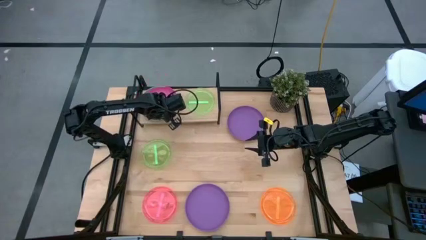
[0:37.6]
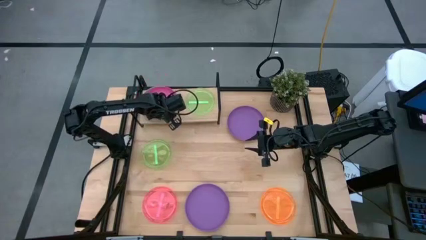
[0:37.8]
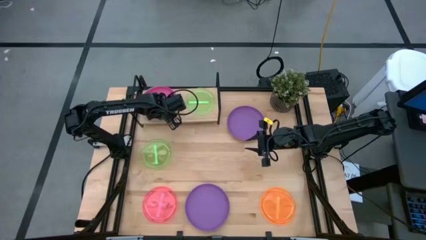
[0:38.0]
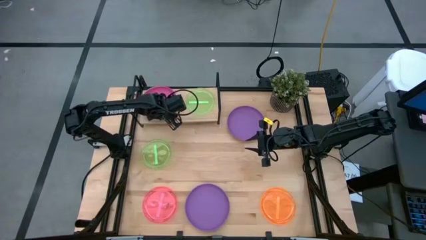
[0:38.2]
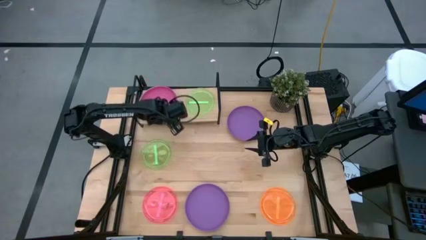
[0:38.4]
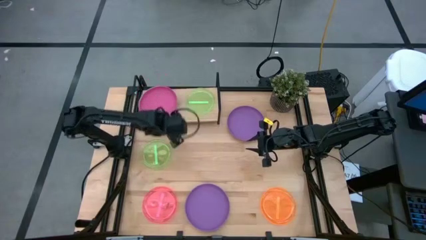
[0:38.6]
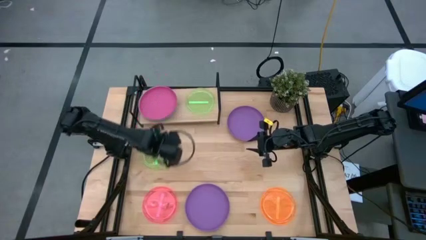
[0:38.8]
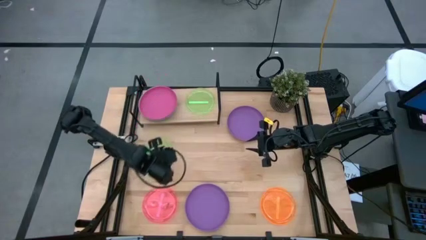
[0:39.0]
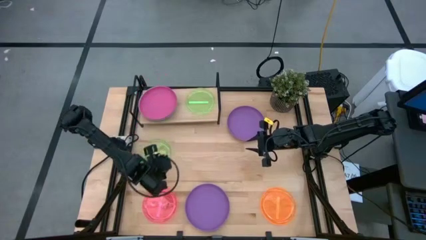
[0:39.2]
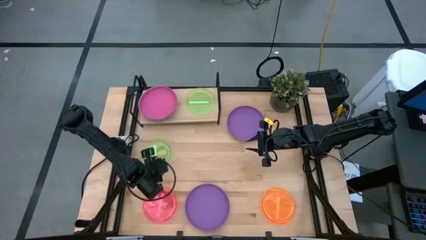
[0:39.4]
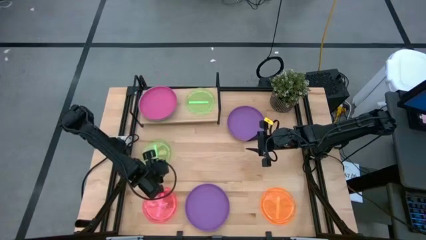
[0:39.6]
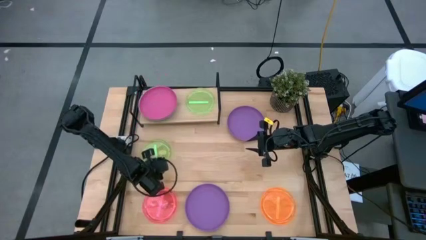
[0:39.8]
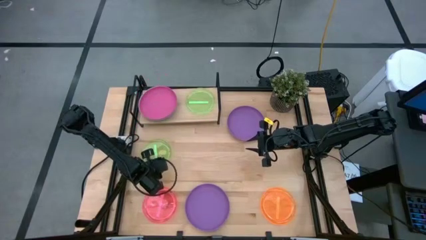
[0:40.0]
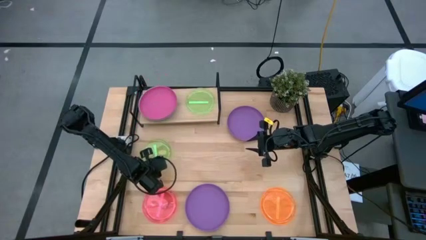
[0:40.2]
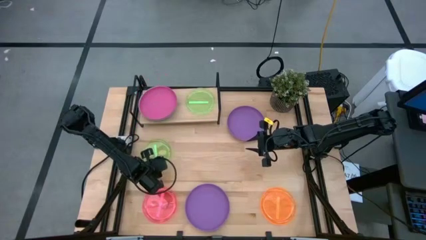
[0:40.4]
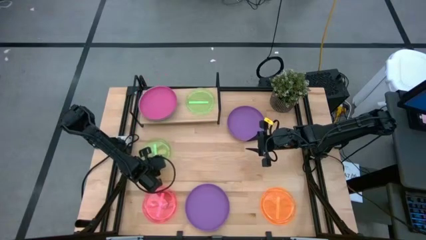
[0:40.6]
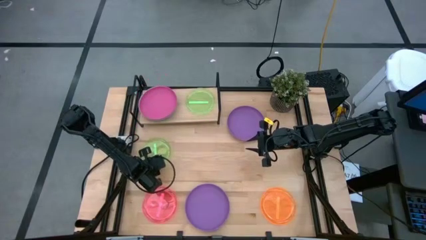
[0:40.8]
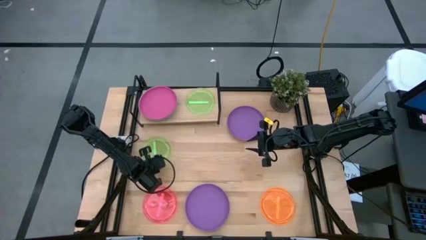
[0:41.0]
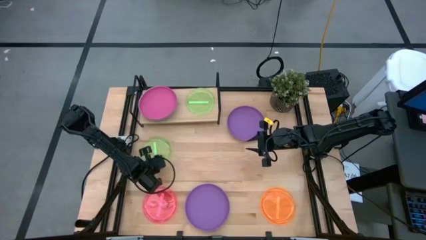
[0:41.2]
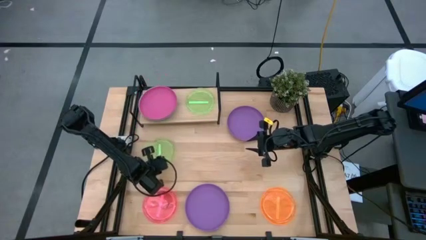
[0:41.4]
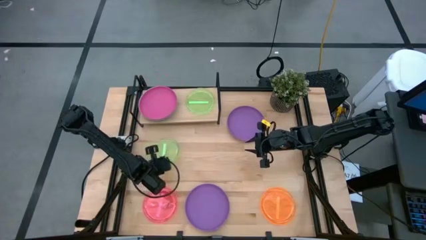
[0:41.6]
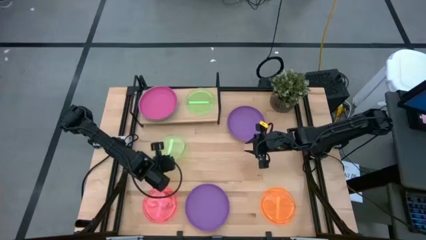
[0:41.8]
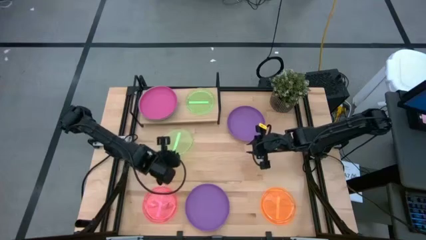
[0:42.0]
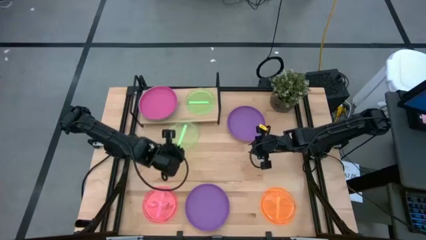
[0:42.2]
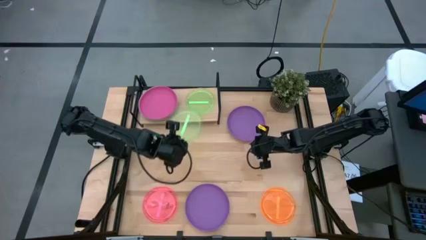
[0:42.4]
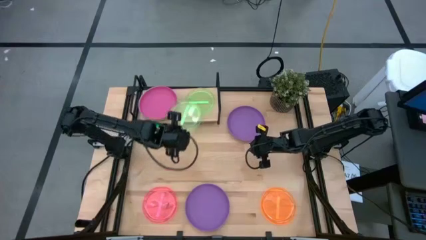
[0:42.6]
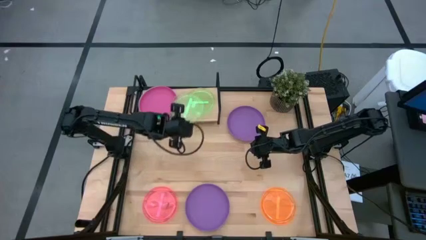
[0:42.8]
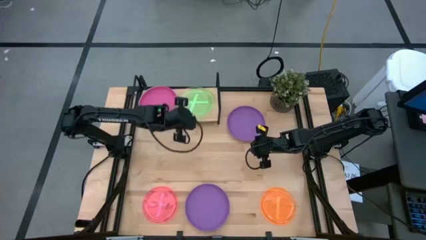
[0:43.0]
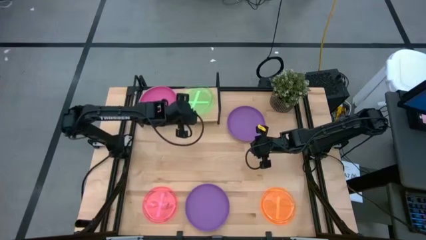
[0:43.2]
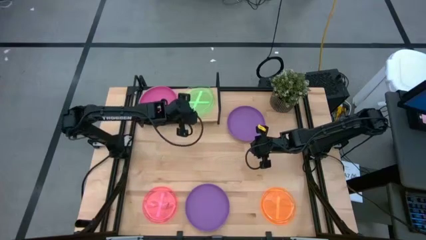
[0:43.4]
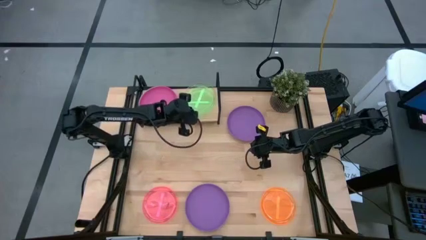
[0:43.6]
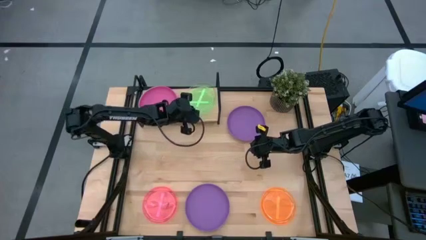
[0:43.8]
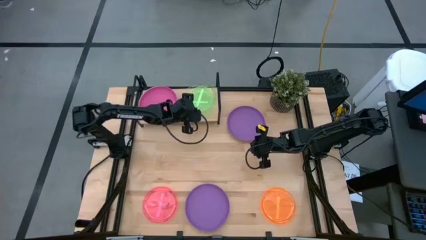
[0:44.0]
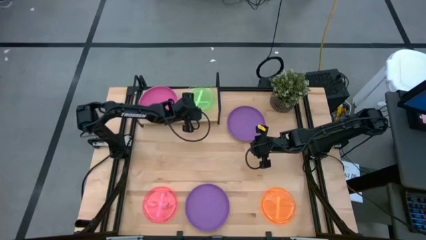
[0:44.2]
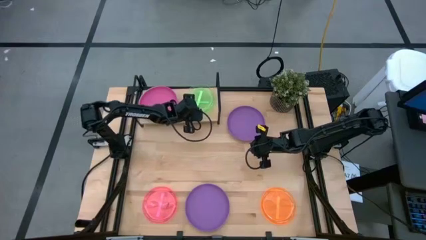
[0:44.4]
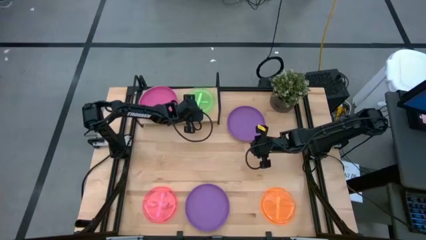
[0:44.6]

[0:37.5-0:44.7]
Task: Place and stack plates onto a shelf
Stack the left green transparent plate into the green transparent plate on the shelf

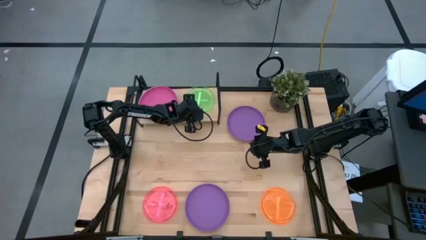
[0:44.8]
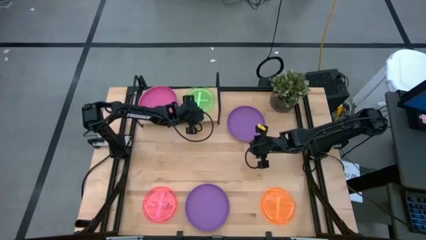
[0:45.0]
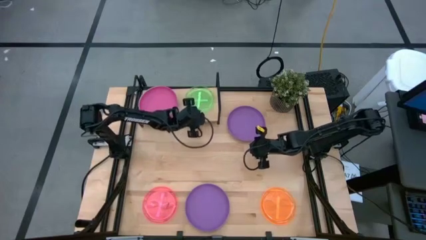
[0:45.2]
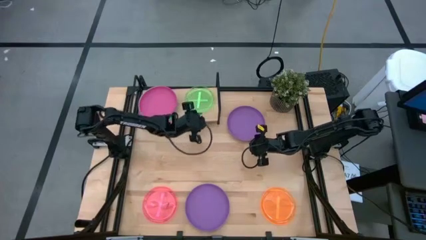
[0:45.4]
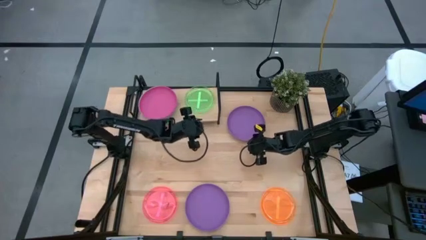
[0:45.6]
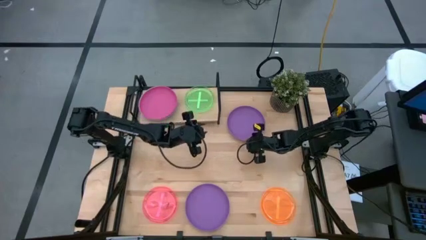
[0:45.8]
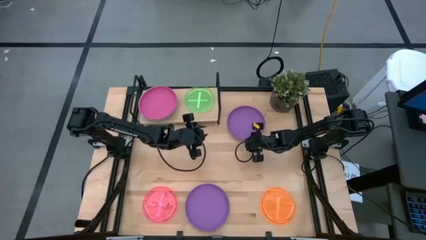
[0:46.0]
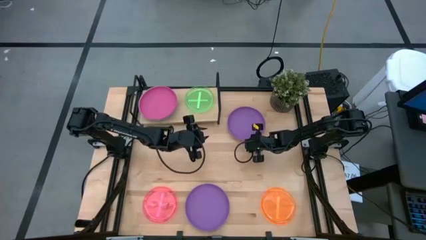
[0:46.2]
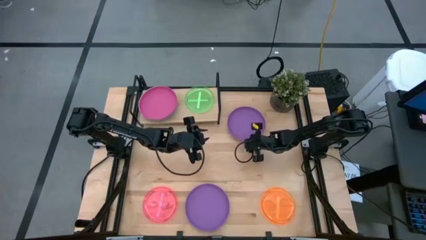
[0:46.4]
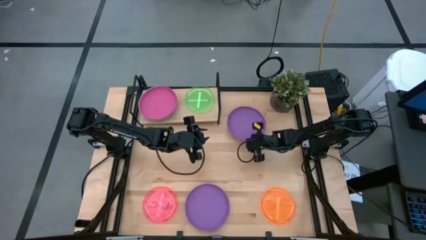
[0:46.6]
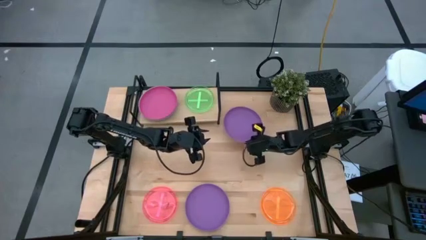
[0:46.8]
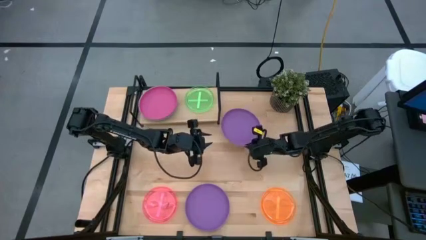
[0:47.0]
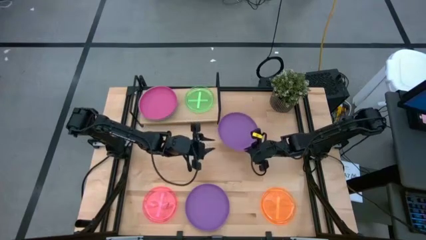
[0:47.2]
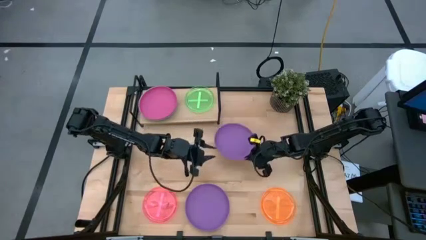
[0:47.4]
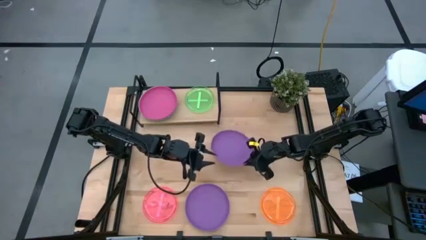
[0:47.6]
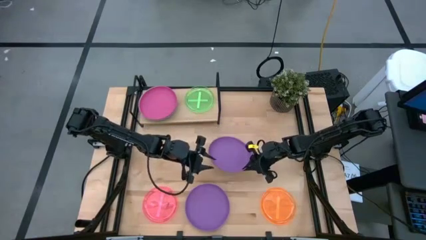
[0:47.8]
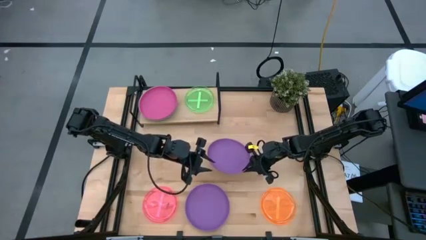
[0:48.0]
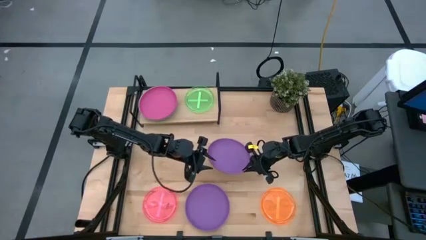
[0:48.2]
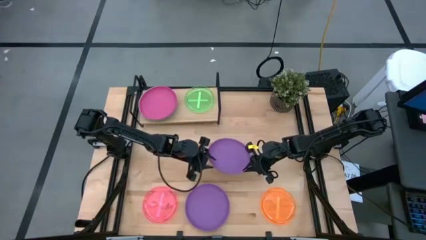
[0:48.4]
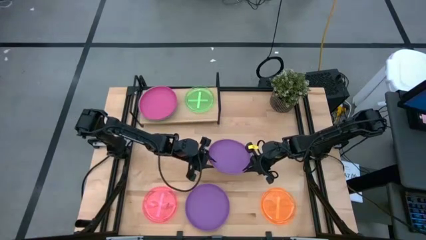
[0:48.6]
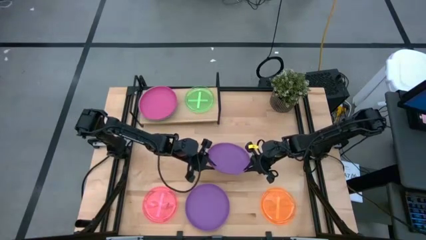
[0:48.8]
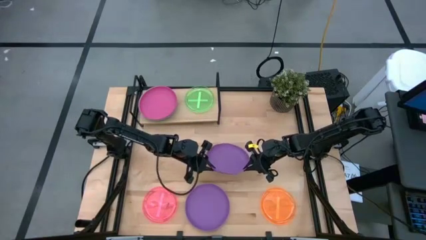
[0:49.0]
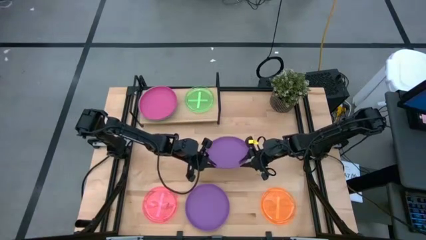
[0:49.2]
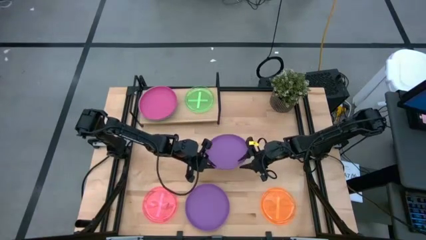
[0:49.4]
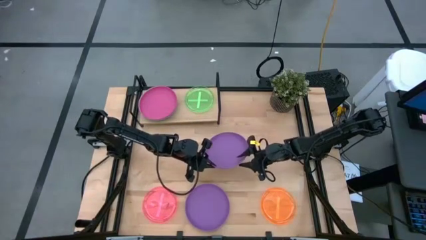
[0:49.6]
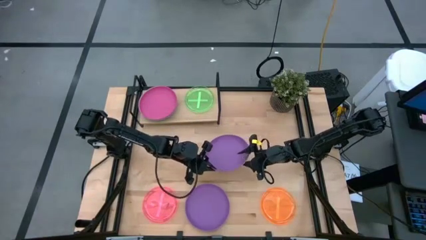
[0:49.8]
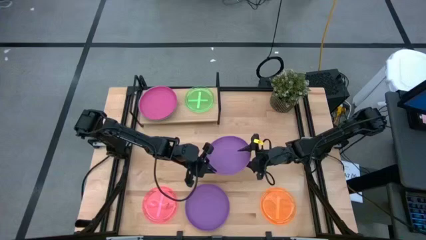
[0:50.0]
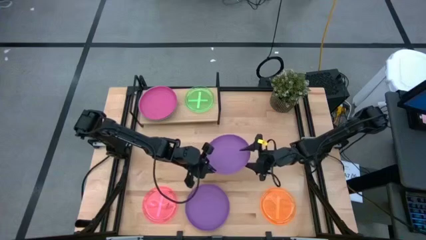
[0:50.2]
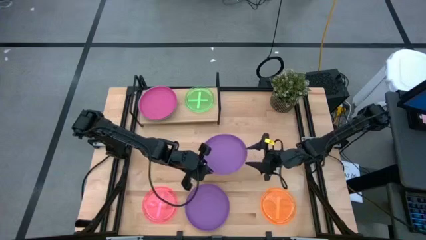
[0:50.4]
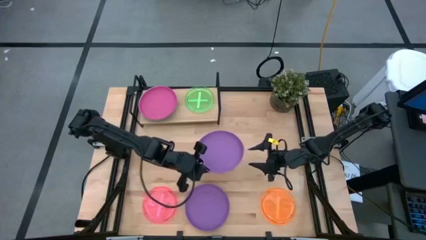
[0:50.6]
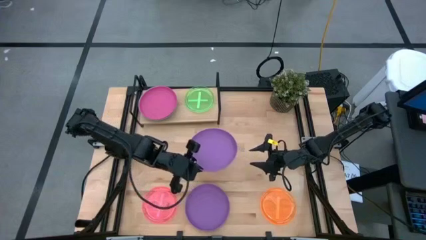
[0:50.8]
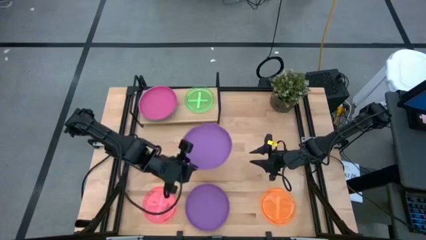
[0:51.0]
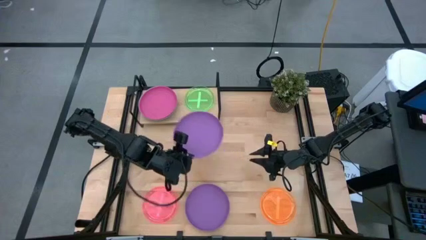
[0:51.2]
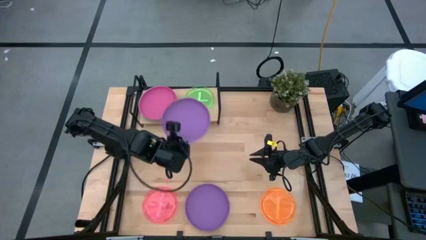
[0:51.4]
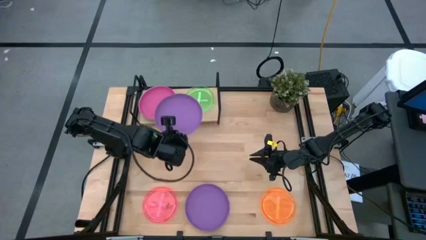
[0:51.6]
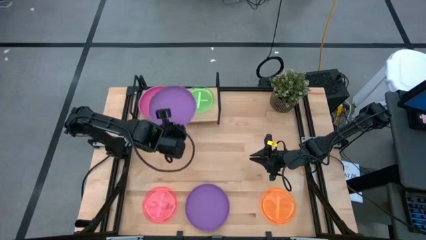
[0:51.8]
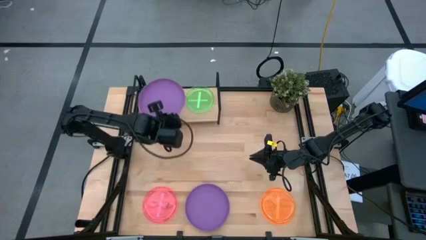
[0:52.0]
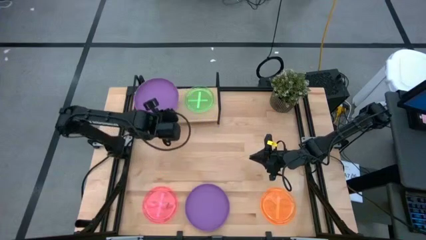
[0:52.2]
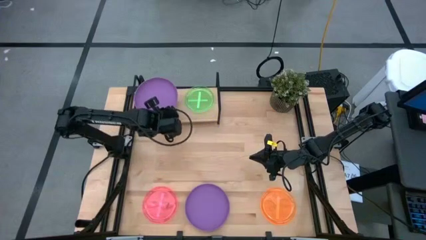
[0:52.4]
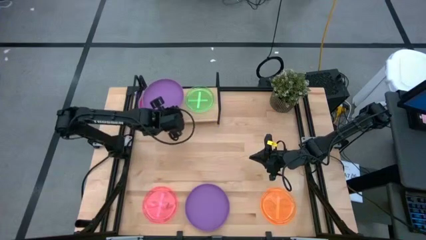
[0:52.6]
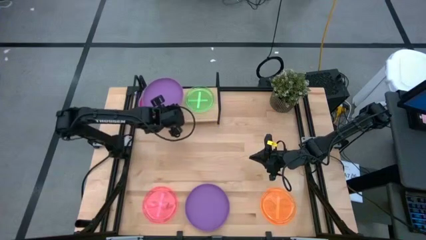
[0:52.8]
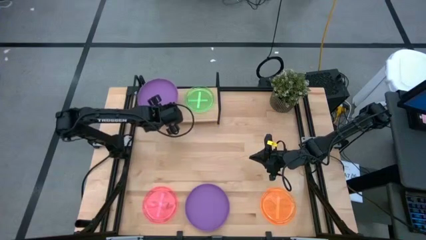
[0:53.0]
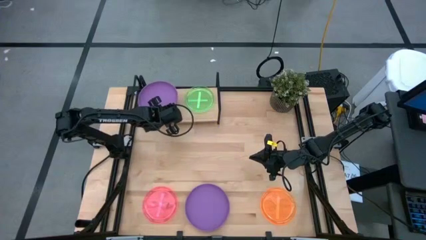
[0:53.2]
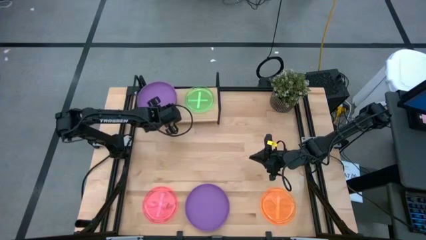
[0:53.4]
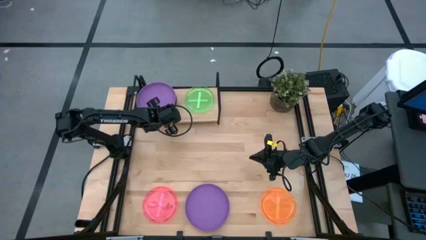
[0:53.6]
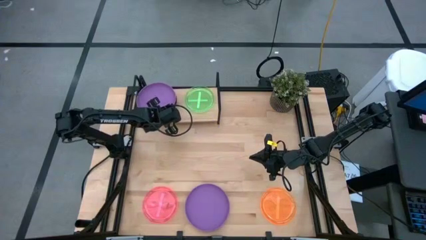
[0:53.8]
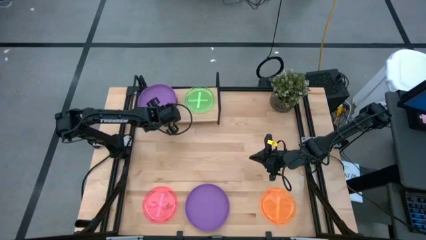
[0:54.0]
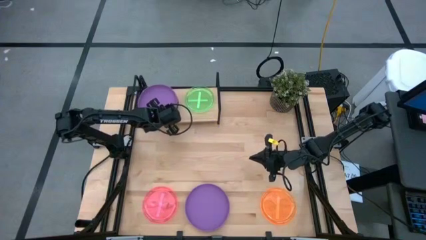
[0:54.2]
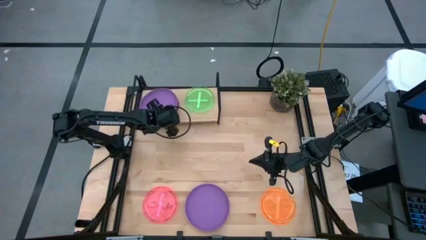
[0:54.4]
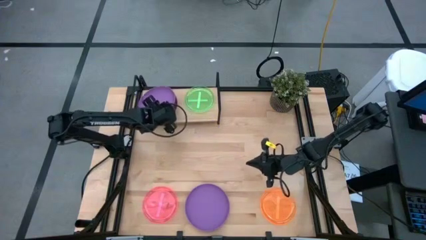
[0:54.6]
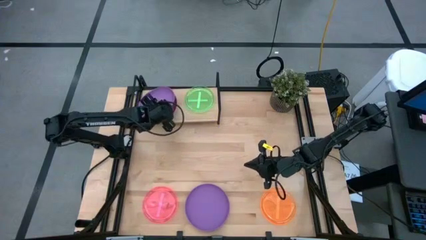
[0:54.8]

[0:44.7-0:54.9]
Stack the top purple plate into the pink plate on the shelf
